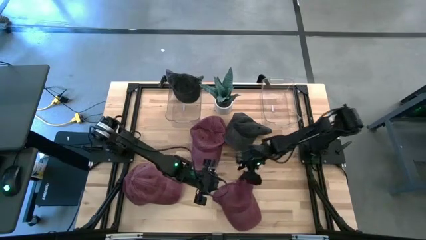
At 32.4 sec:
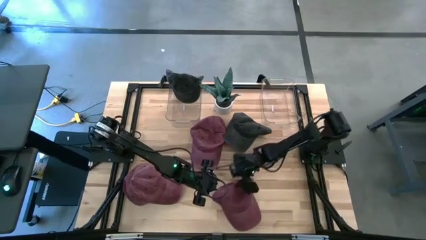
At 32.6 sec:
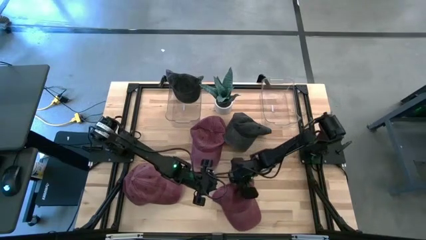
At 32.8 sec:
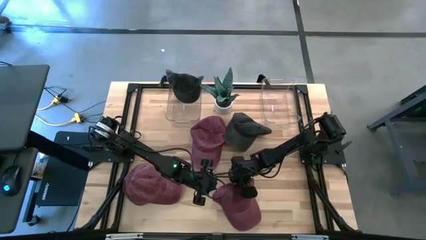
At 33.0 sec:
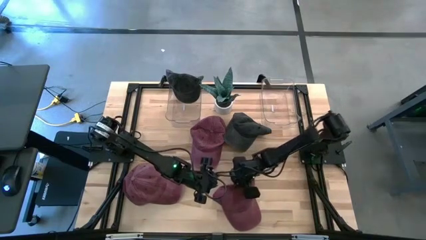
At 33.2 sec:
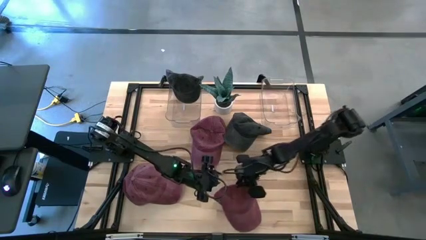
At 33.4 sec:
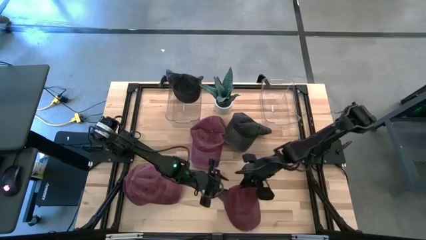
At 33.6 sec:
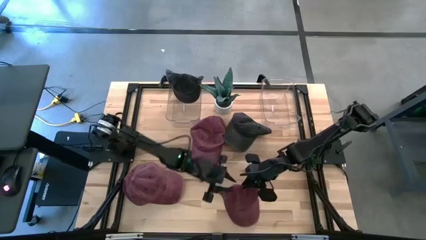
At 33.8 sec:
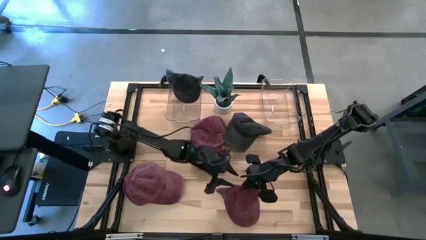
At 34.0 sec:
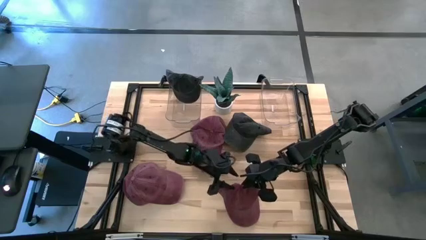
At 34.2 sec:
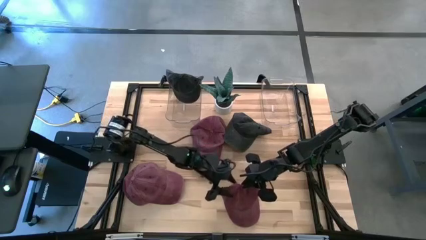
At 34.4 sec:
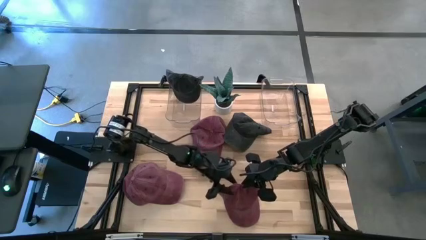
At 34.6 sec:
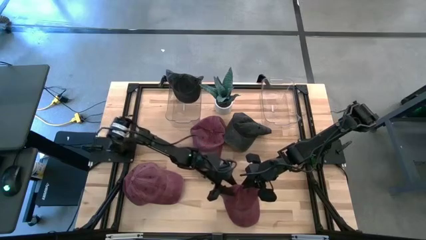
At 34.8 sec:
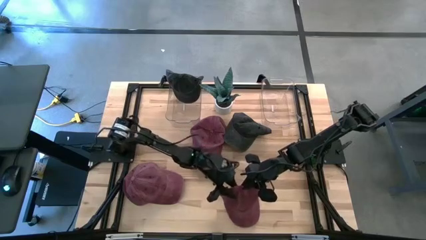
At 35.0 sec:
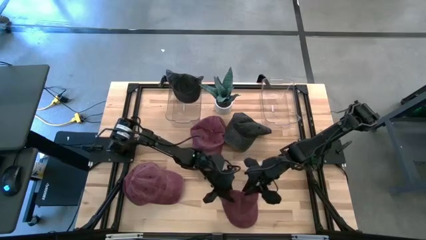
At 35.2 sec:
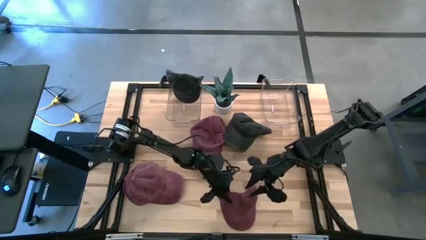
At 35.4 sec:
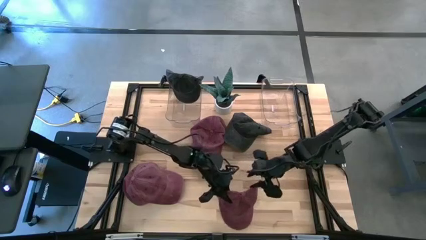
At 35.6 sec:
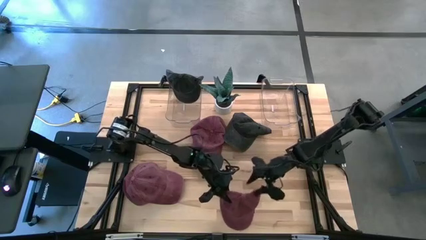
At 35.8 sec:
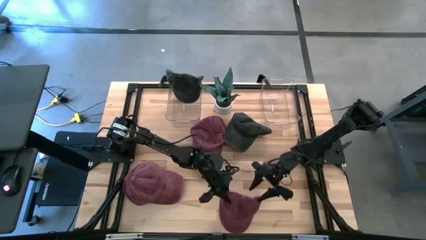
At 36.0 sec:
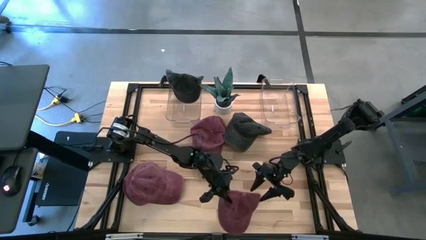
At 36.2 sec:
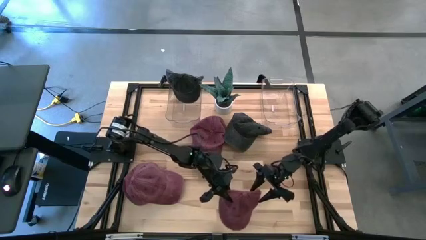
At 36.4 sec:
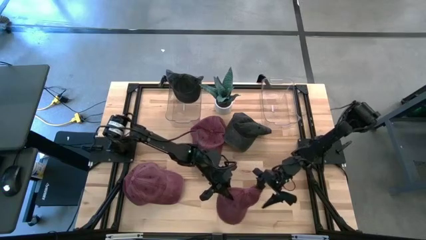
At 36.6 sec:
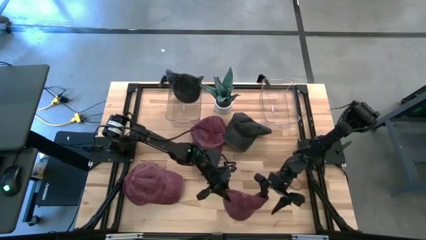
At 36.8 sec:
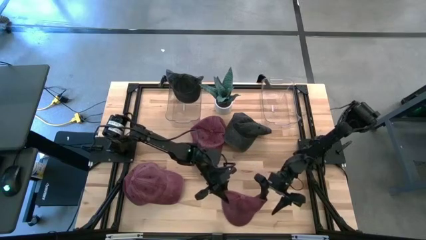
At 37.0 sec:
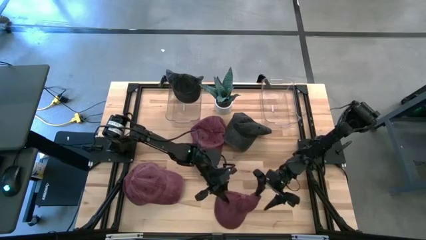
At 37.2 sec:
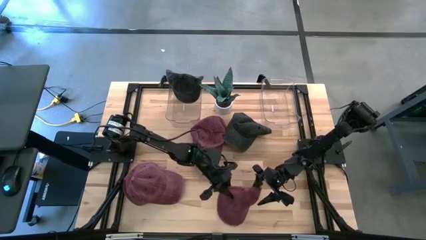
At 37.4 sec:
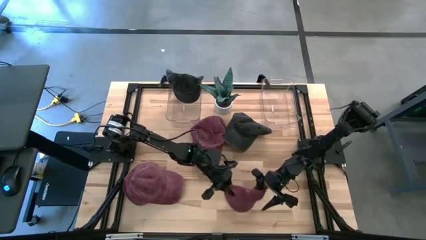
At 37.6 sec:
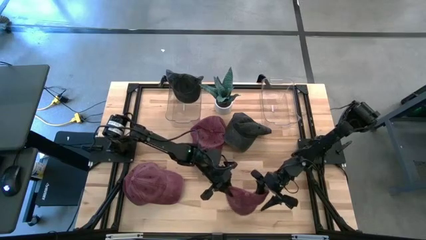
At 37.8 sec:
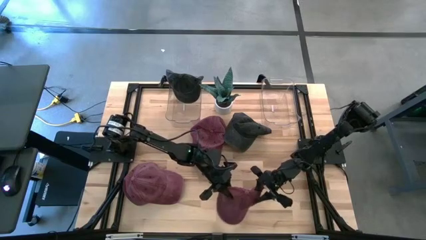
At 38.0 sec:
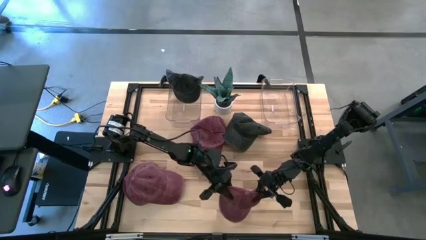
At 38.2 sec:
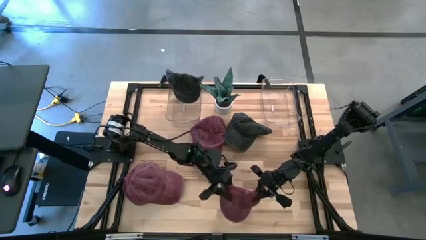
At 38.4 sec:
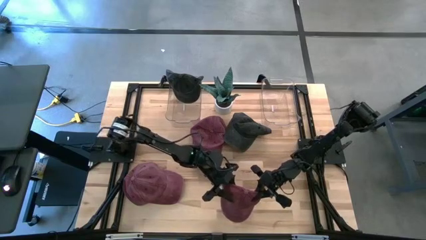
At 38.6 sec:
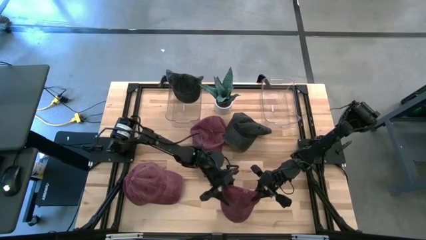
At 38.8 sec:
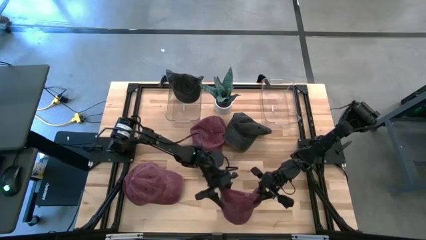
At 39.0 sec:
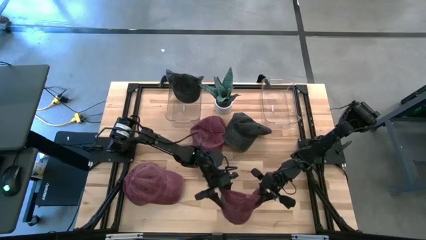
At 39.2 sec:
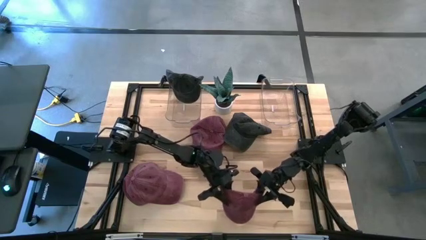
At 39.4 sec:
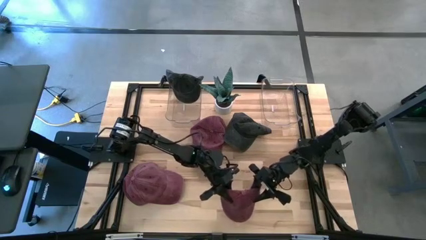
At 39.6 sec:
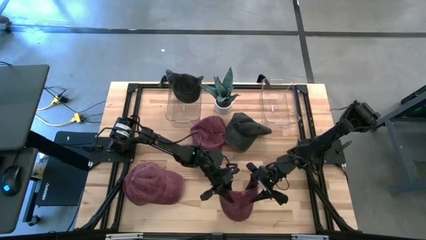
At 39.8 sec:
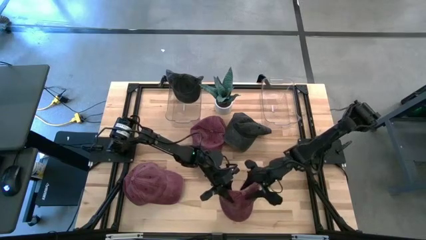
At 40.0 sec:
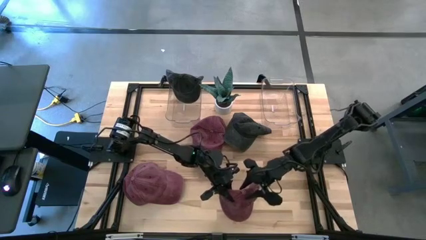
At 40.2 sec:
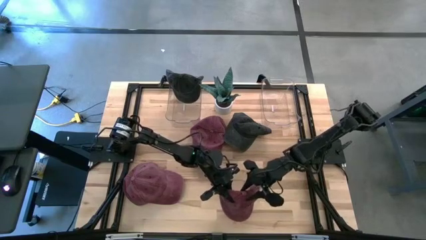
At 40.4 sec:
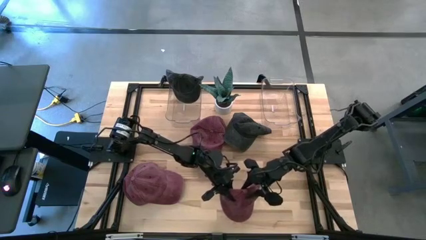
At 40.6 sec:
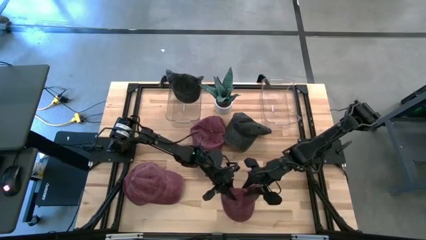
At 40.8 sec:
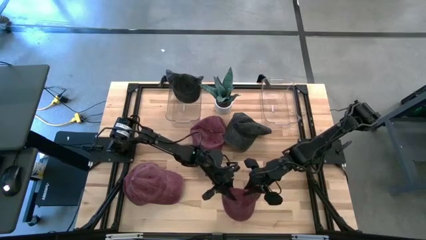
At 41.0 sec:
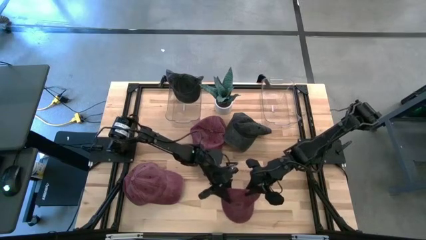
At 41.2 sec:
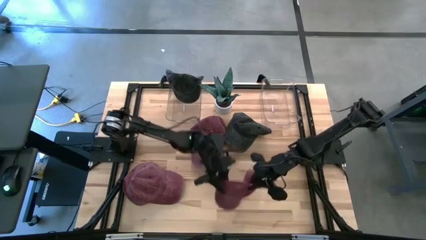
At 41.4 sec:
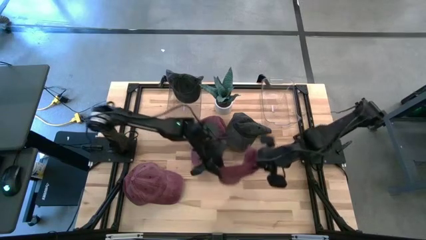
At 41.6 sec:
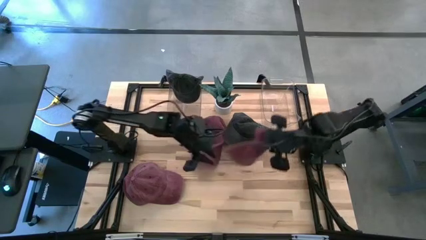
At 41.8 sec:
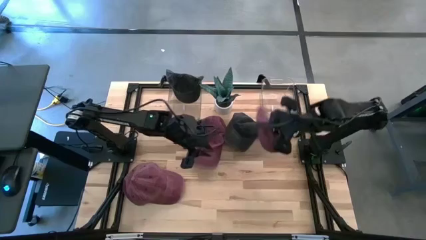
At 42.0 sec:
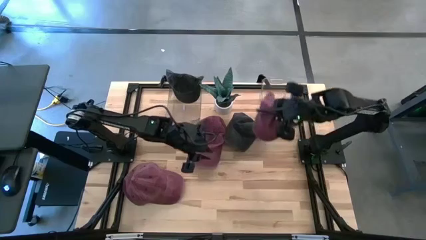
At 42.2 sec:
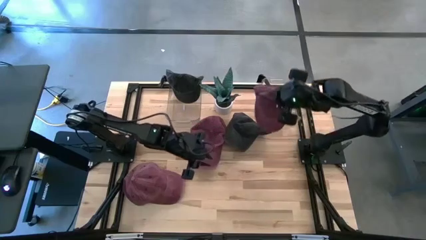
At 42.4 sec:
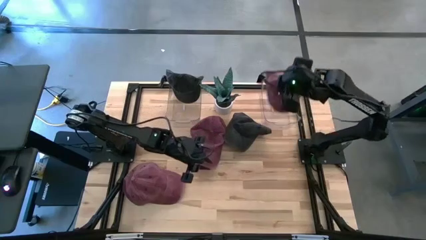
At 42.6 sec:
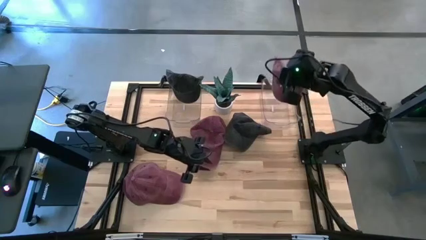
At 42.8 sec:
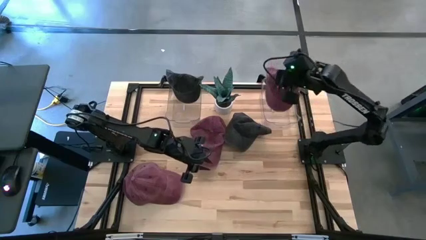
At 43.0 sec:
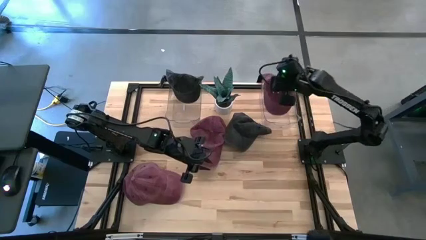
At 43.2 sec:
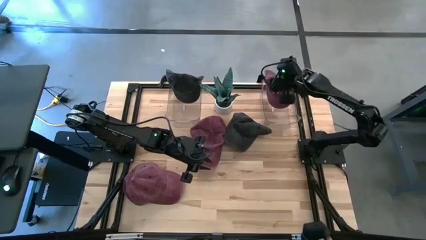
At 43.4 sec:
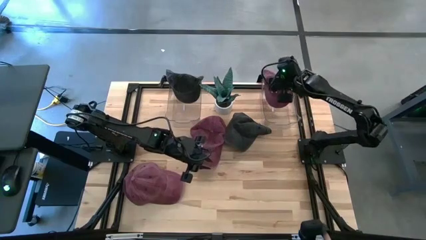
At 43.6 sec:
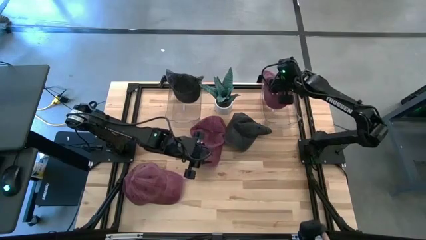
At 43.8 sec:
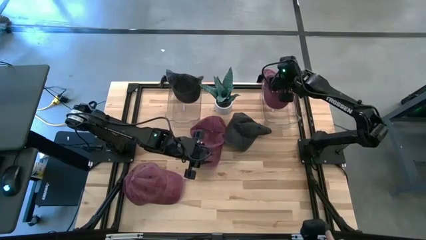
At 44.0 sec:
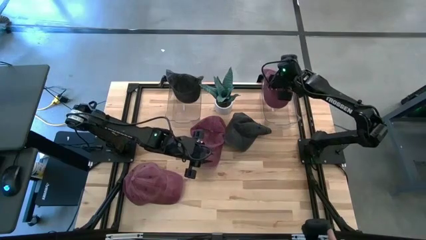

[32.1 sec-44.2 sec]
Task: Pick & Place hat
Put the bottom right red cap into the right transparent bin

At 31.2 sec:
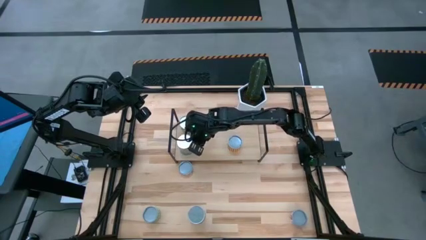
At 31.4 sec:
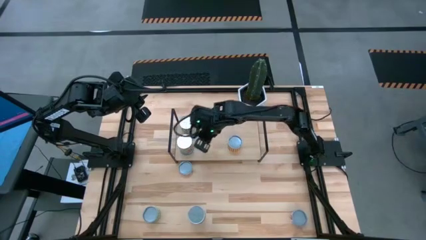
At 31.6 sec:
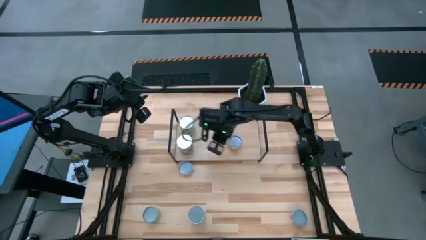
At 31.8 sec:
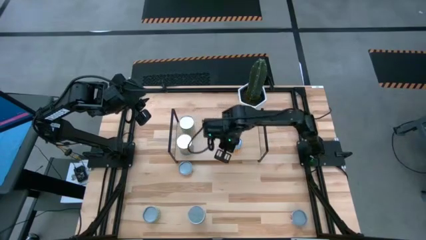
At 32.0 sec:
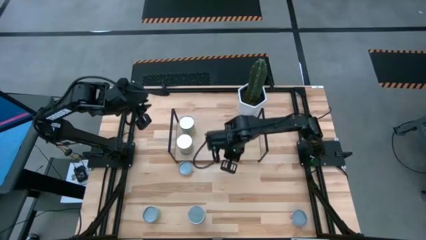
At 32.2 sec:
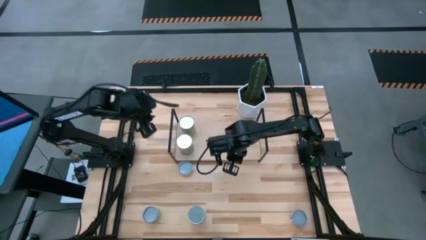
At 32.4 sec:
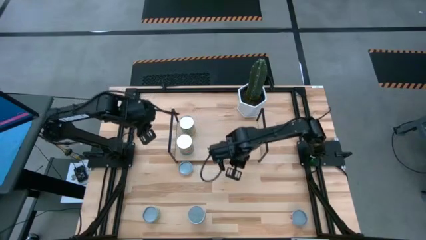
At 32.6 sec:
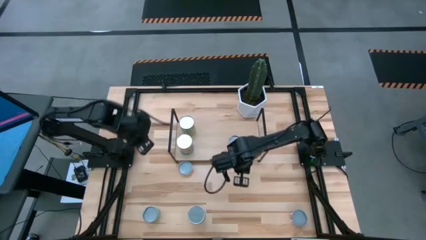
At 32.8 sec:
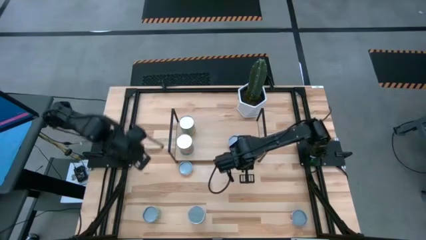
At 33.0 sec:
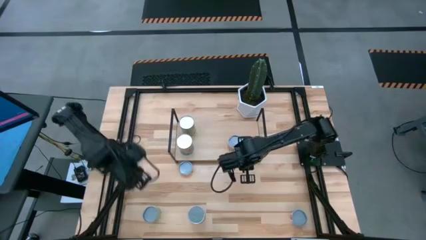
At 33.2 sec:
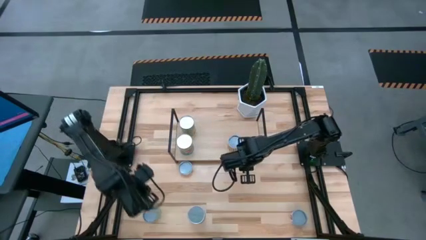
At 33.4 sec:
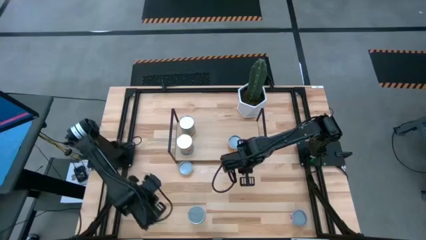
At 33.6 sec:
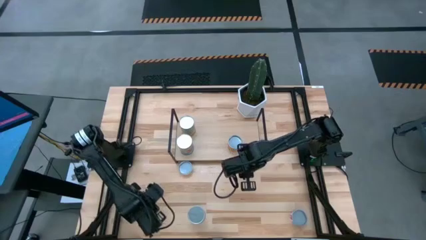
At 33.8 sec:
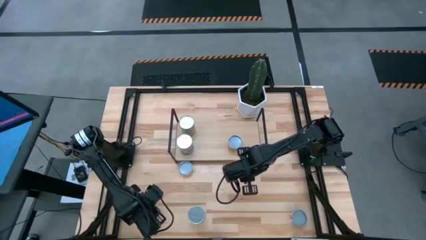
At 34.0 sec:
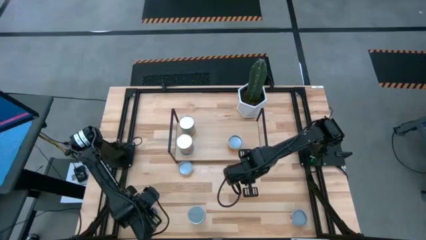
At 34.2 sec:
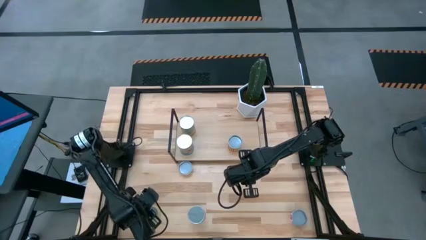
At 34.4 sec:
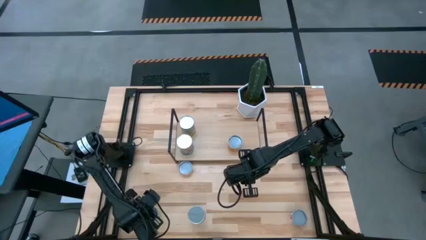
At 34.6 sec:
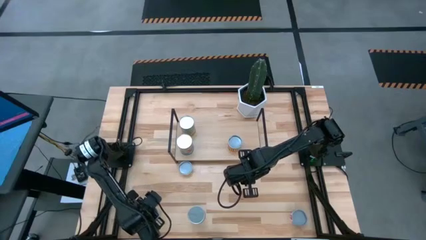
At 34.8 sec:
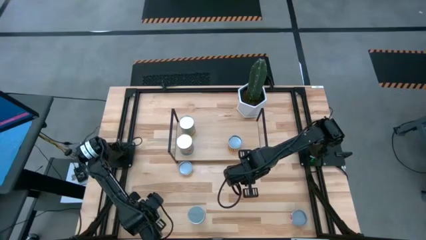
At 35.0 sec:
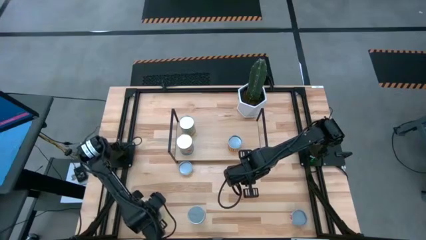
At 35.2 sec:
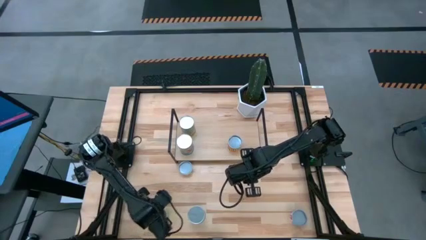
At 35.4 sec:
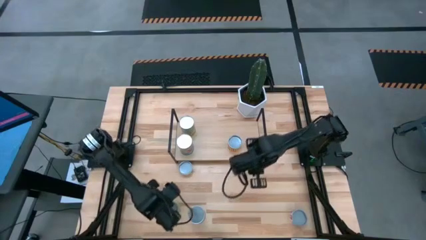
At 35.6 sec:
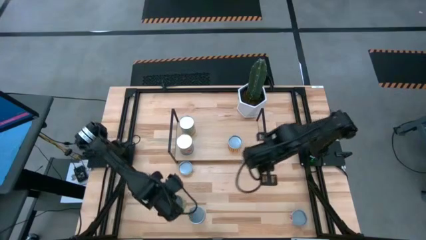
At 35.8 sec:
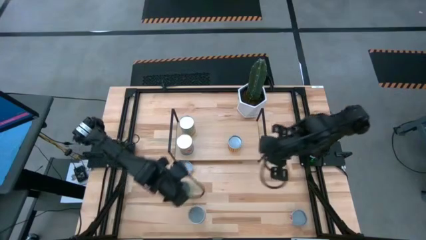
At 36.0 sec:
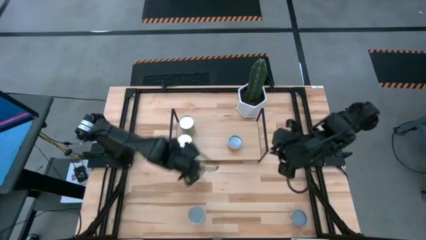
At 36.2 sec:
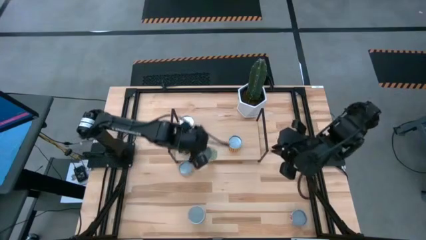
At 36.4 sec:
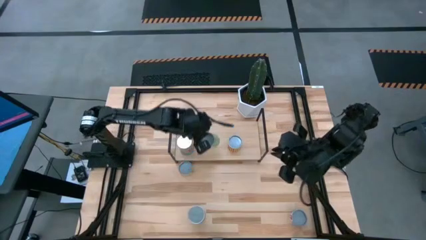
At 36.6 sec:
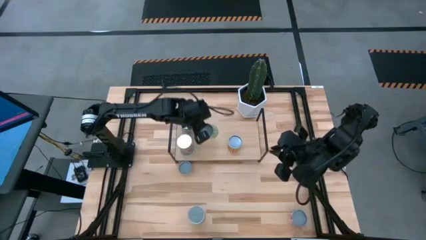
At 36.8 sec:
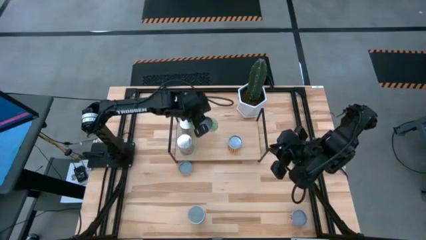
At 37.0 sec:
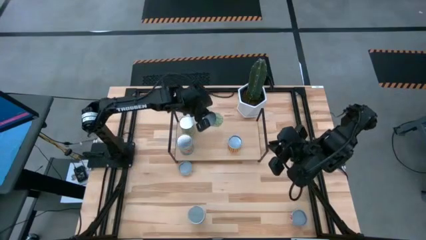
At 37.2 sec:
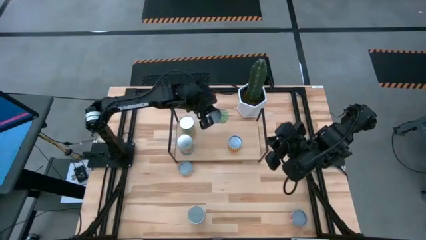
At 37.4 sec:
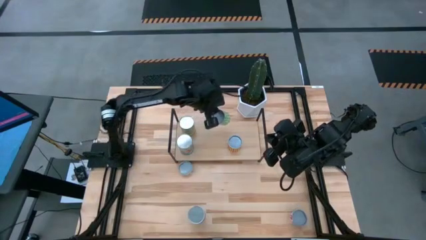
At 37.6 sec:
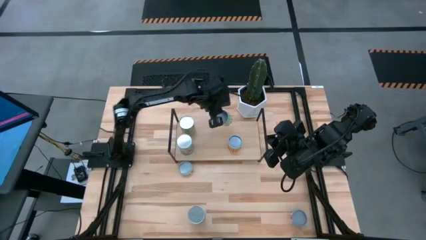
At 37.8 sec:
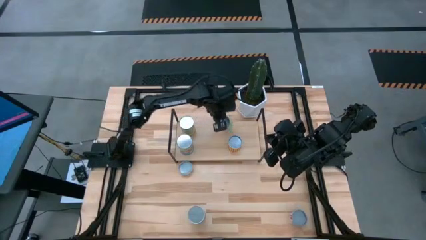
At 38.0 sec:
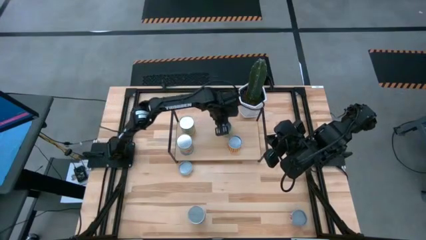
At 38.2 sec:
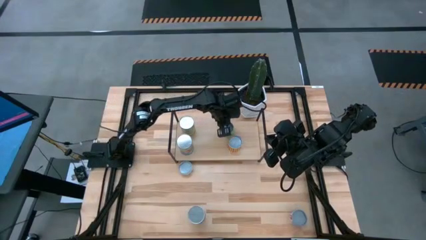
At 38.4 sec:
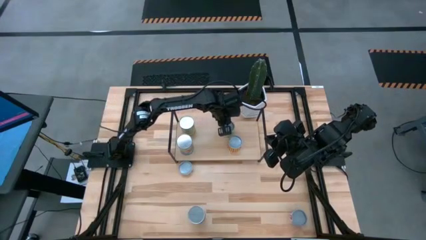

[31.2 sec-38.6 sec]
Task: Pick and place cans onto a shelf
Put the small canned peas on the shelf aligned with the other small canned black beans
